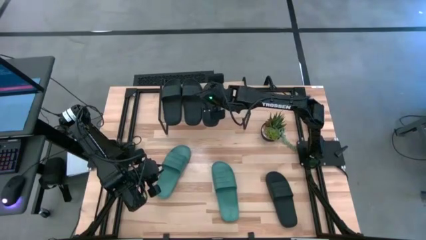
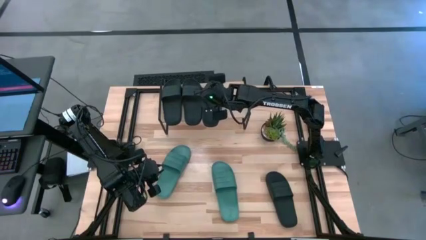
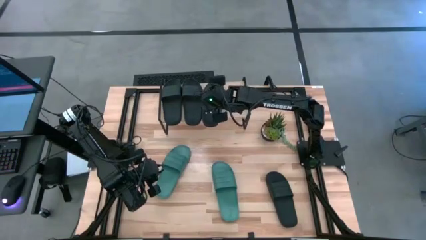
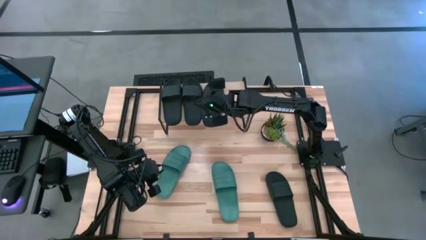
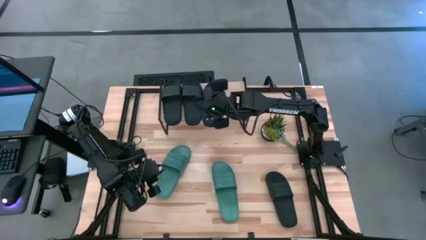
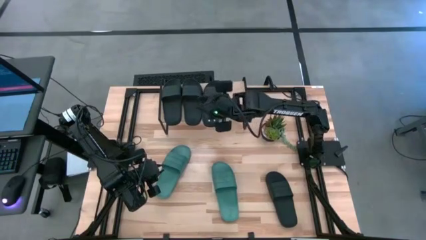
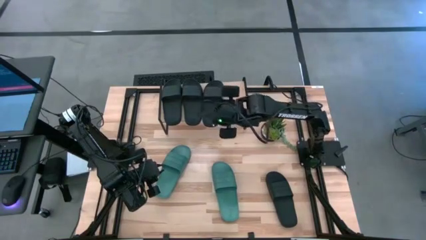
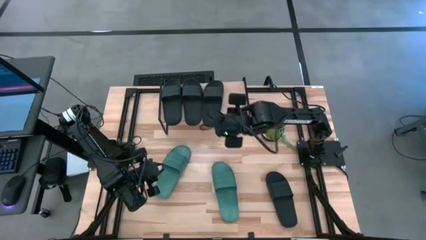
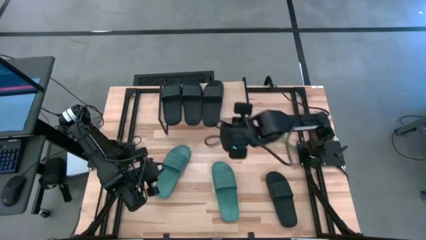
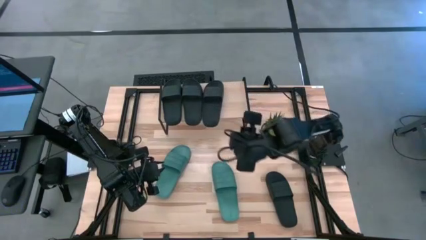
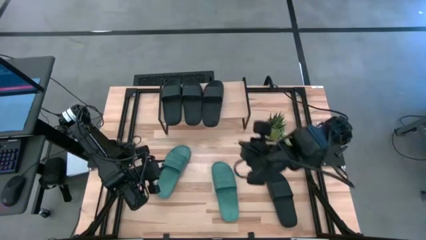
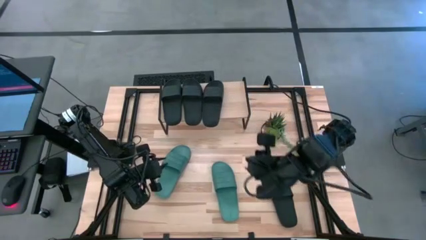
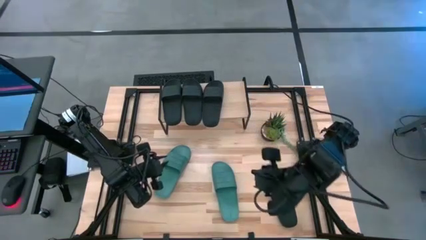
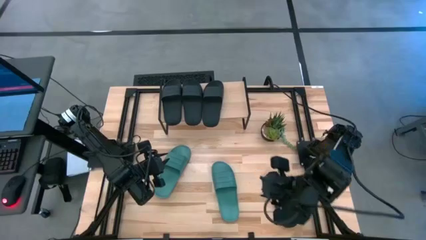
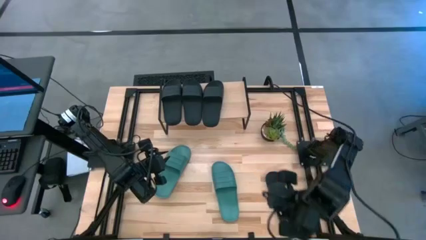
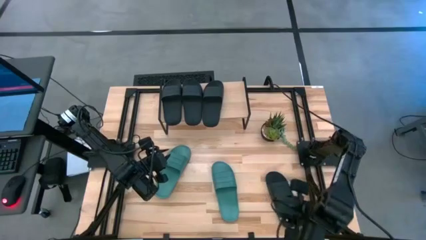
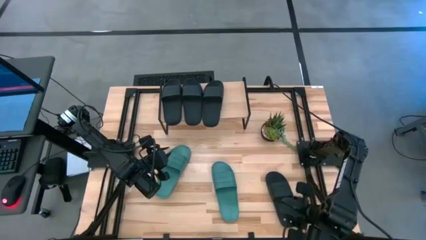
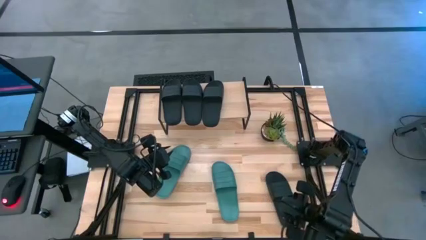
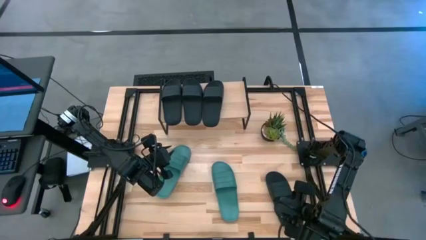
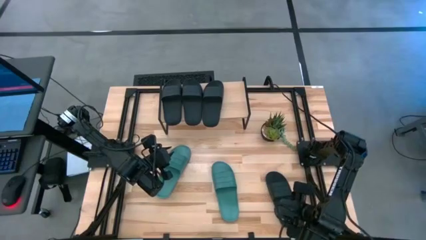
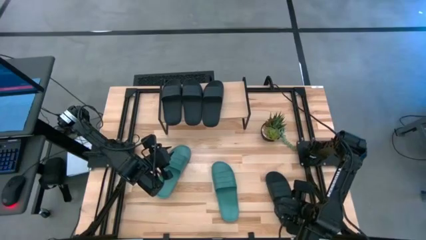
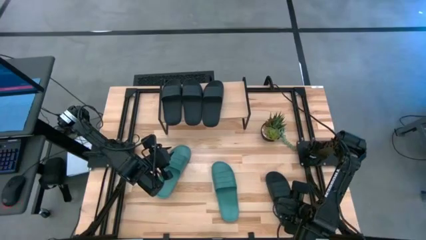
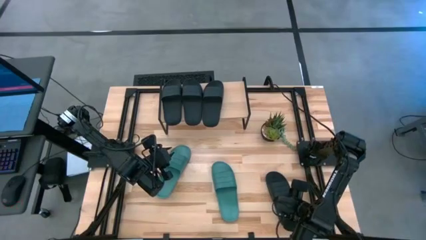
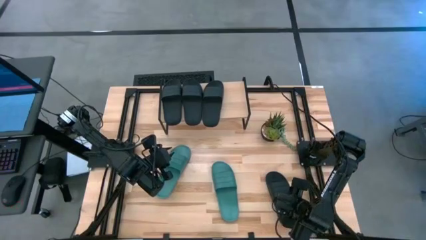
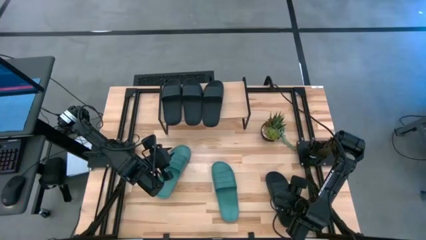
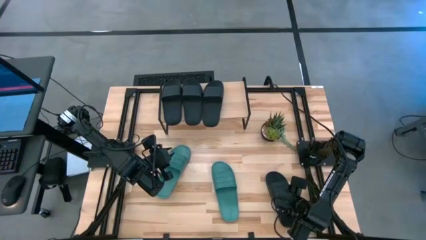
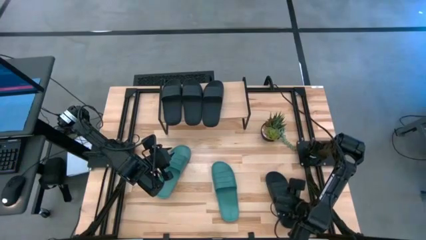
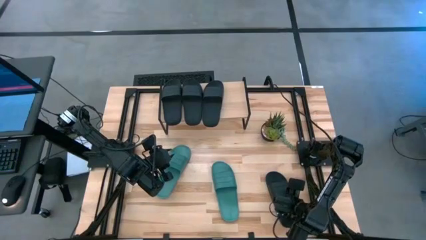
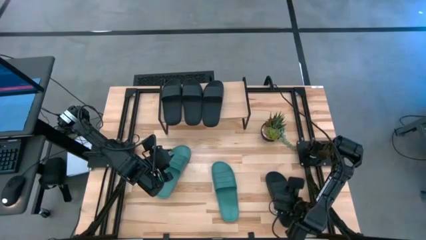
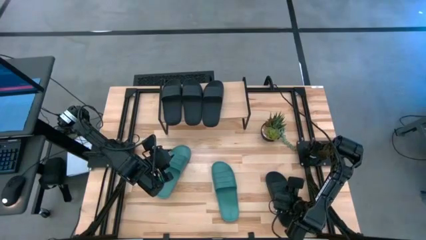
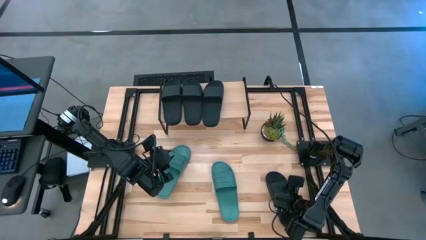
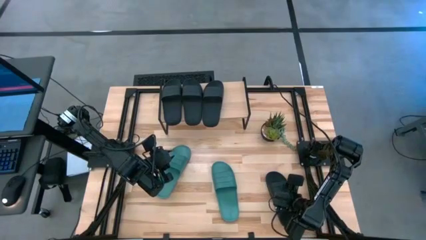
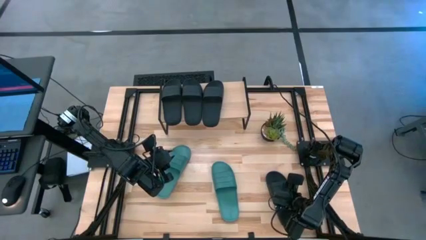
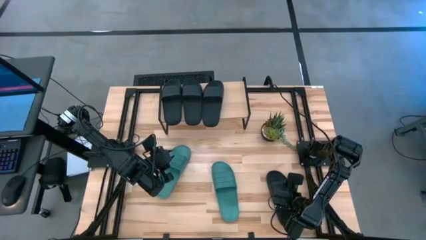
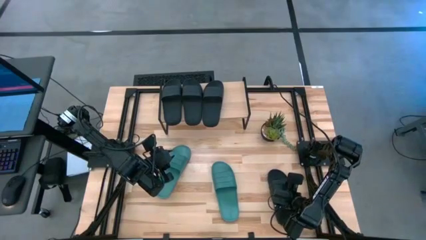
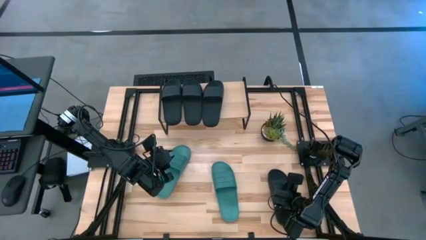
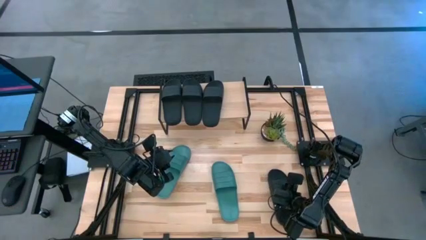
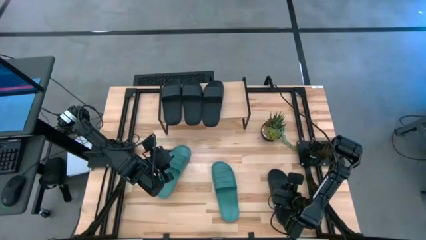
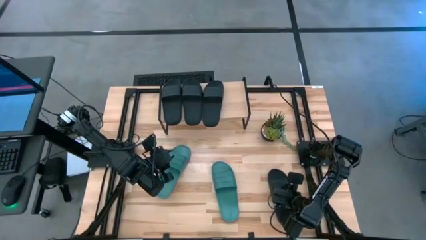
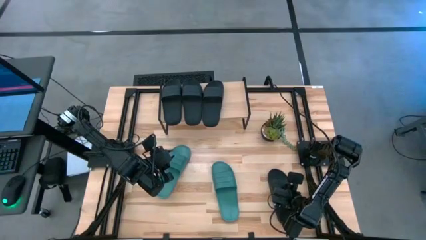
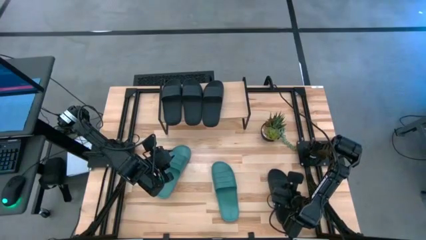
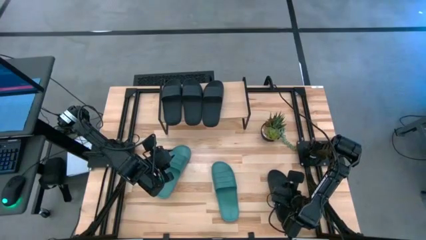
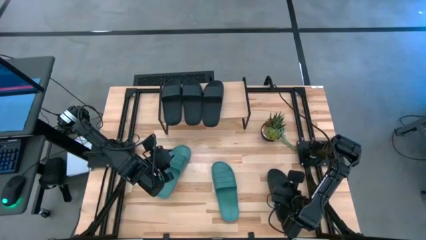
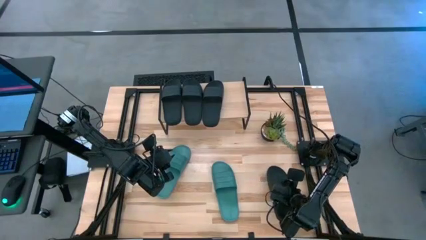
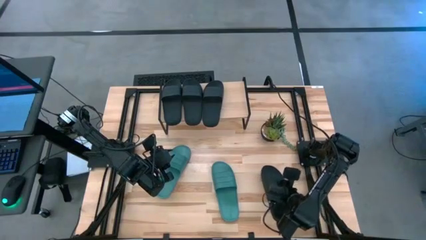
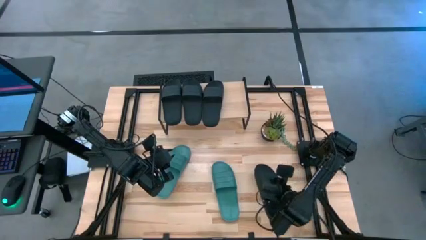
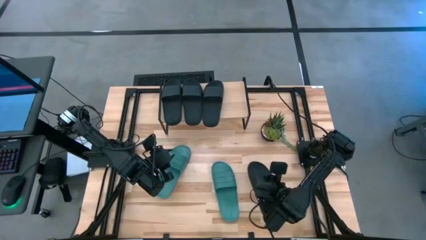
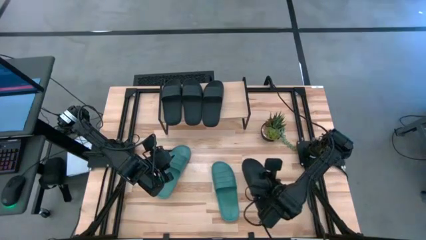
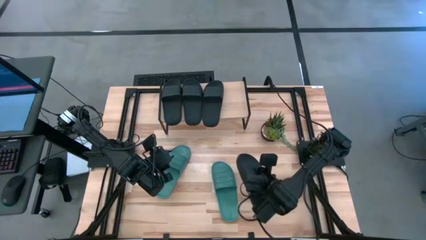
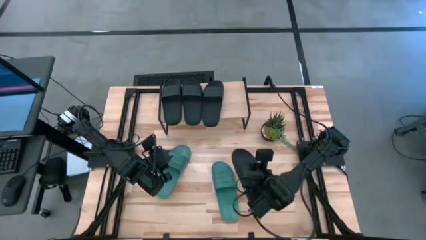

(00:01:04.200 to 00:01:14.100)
Task: Pick and place slides into the shelf
Put the black slide on the shelf

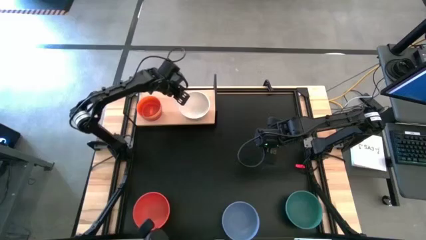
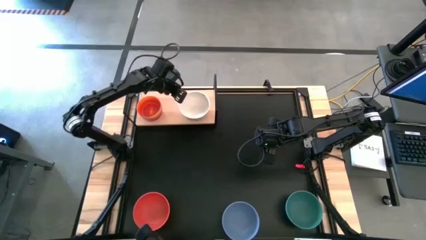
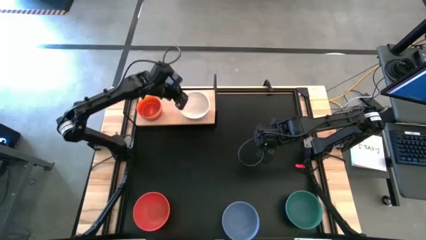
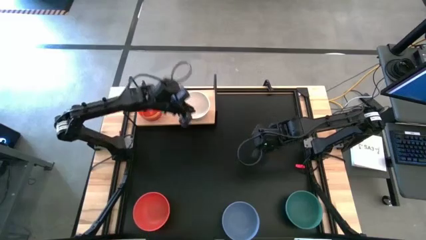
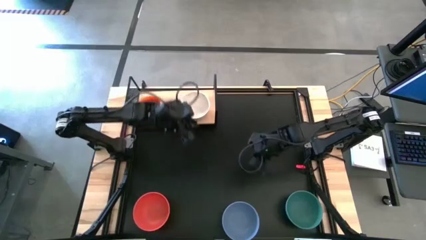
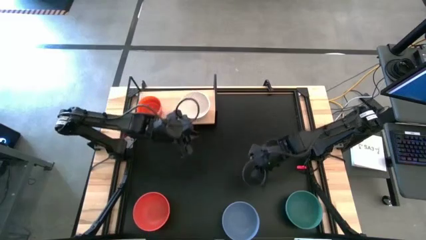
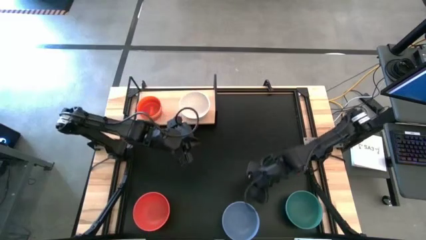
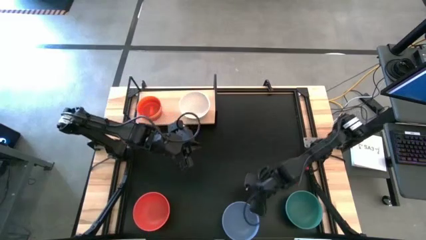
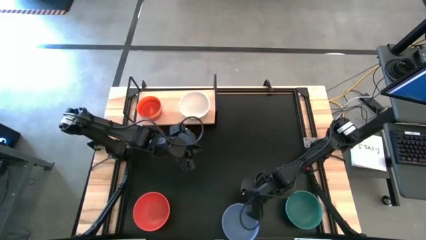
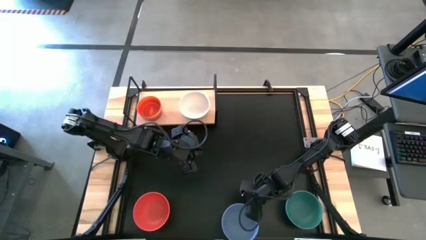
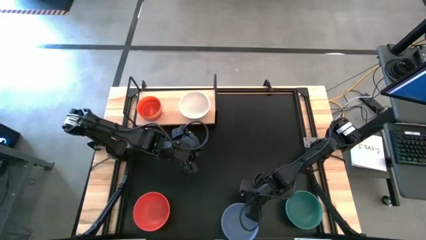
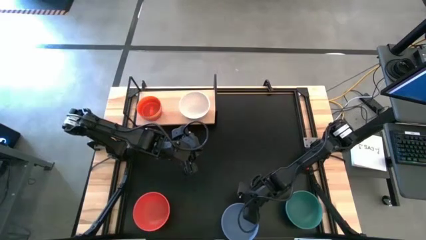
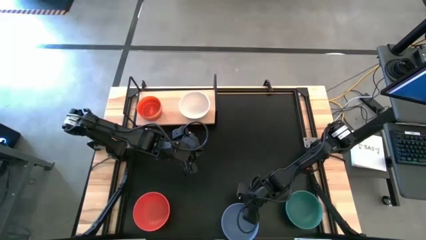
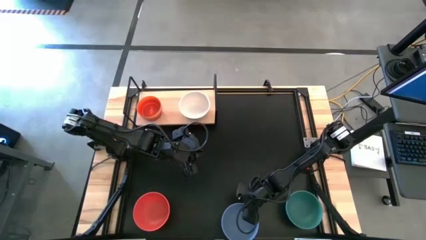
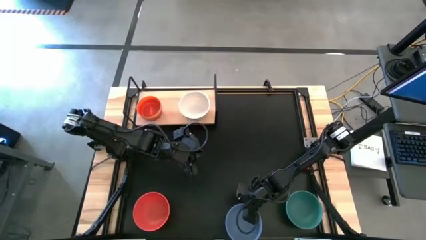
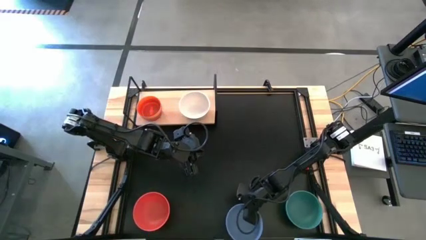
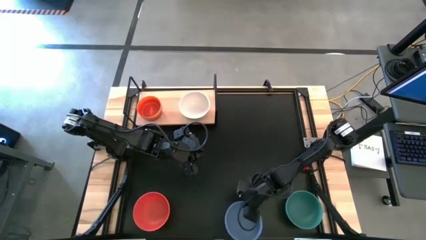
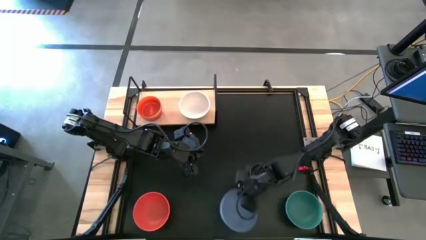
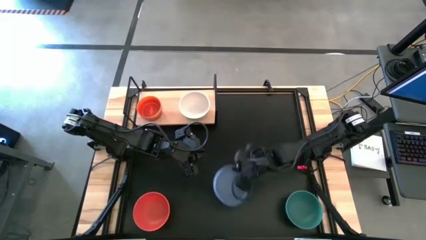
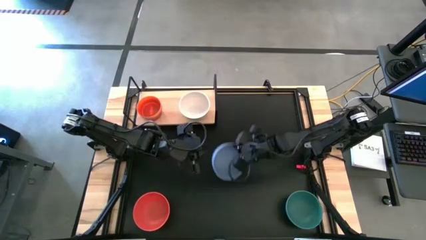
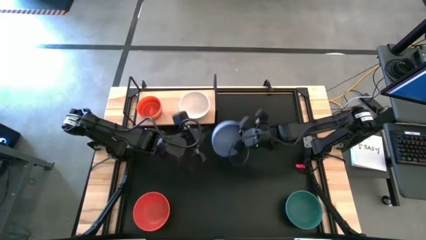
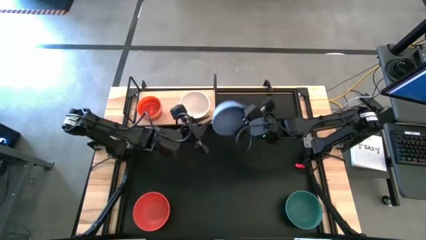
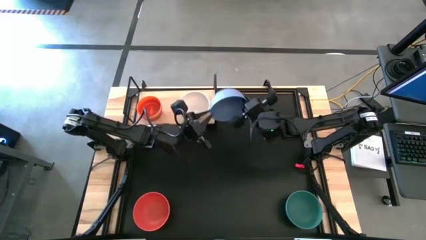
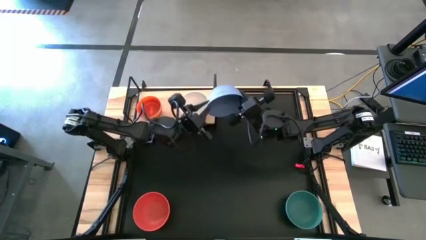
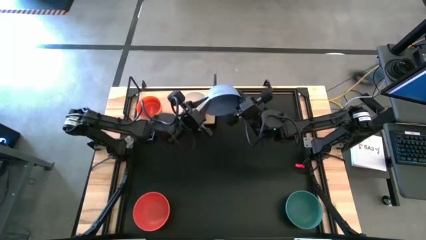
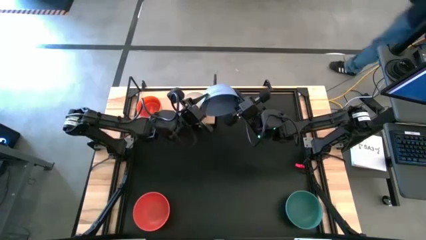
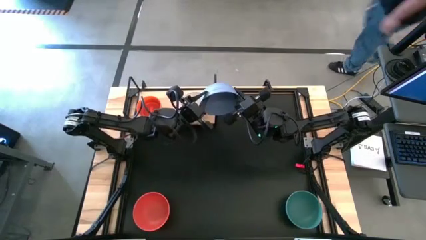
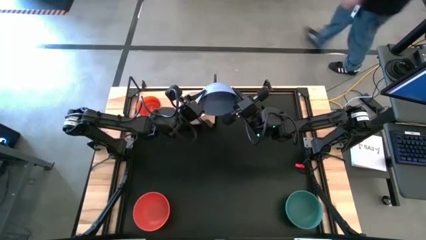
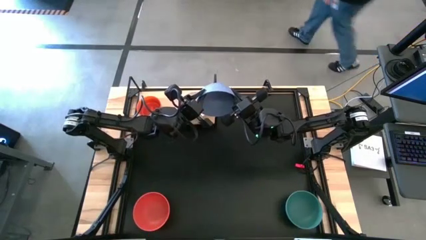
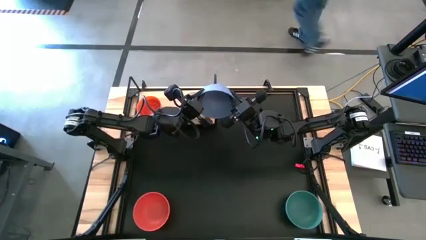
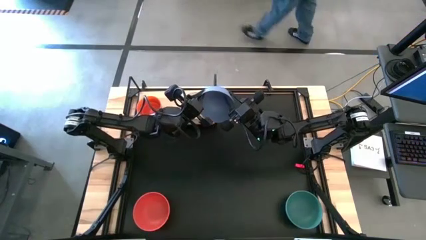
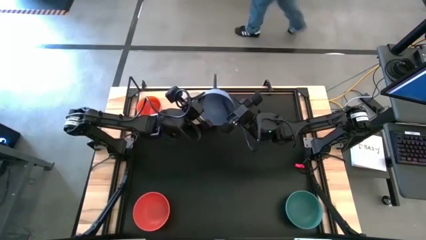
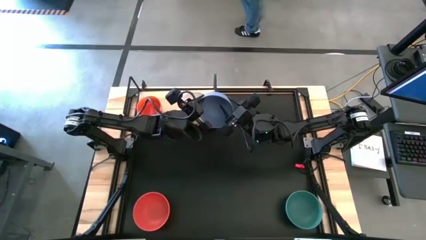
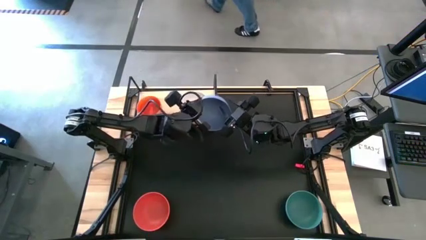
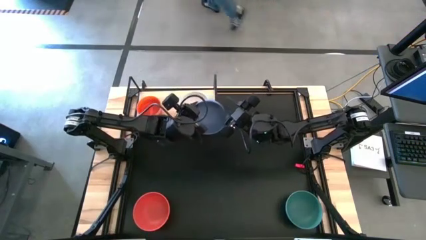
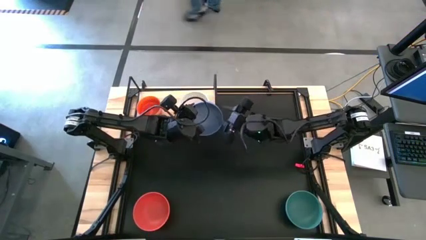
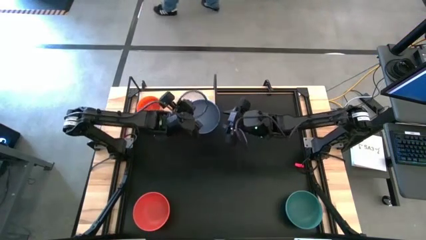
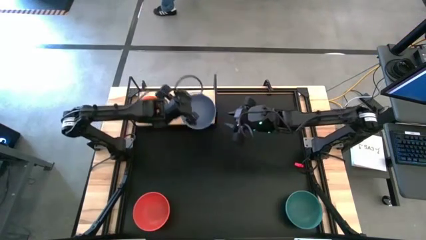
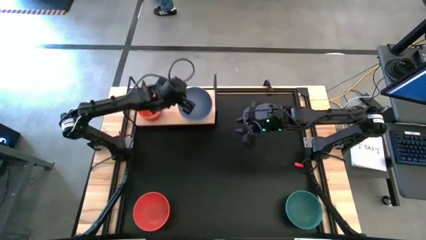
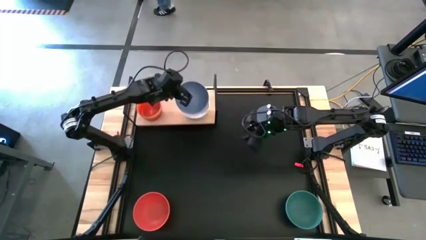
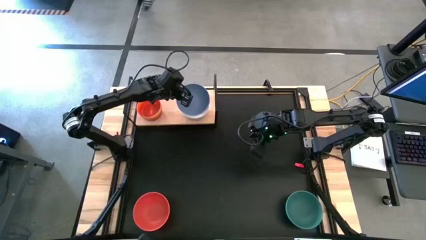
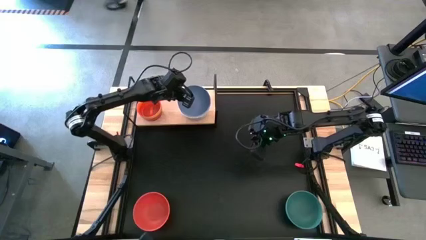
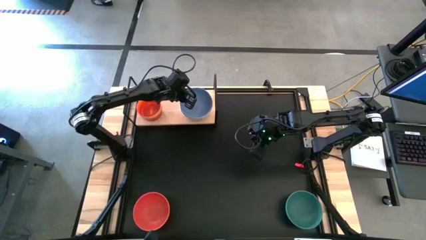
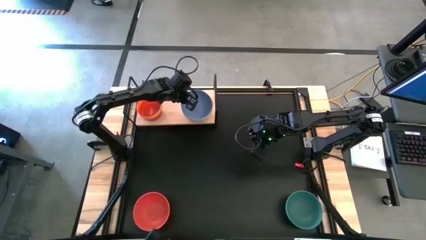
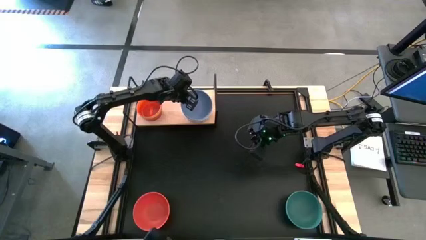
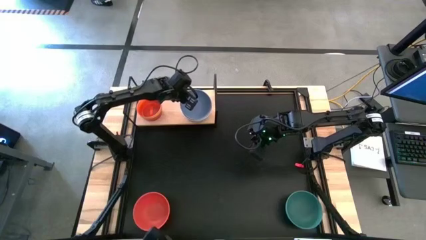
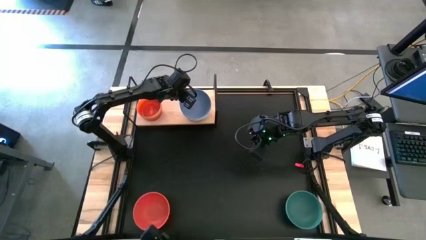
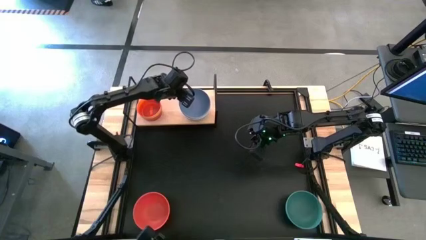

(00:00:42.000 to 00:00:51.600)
Task: Place and stack bowls onto a shelf
Stack the blue bowl on top of the white bowl on the shelf
